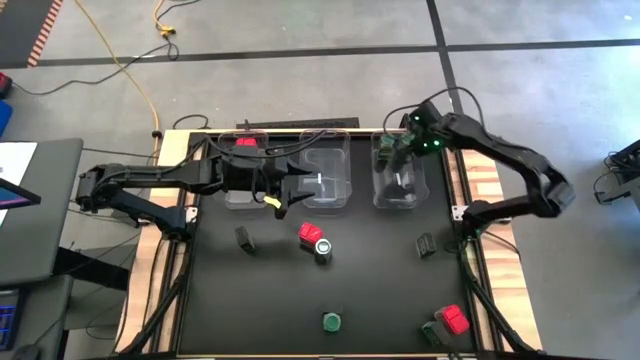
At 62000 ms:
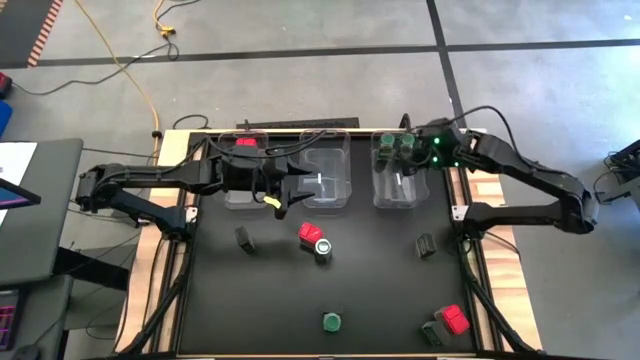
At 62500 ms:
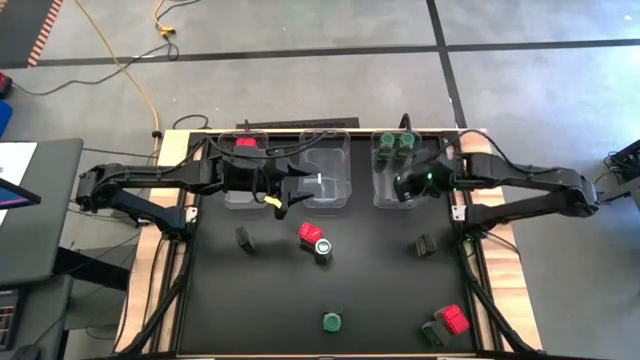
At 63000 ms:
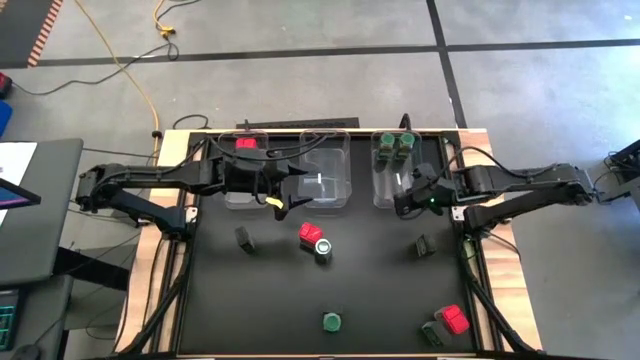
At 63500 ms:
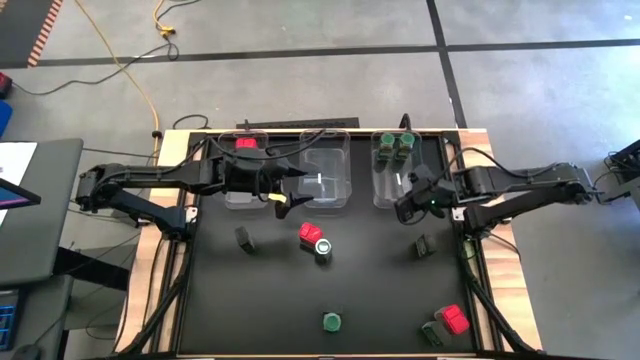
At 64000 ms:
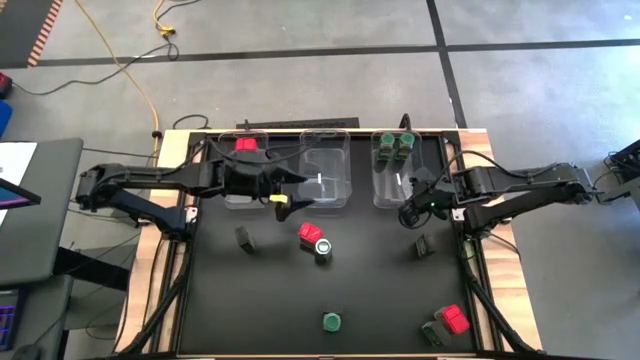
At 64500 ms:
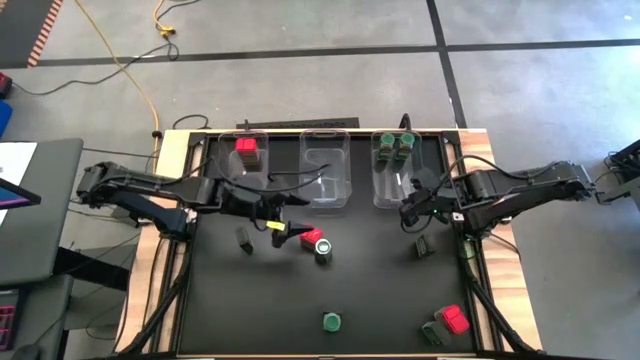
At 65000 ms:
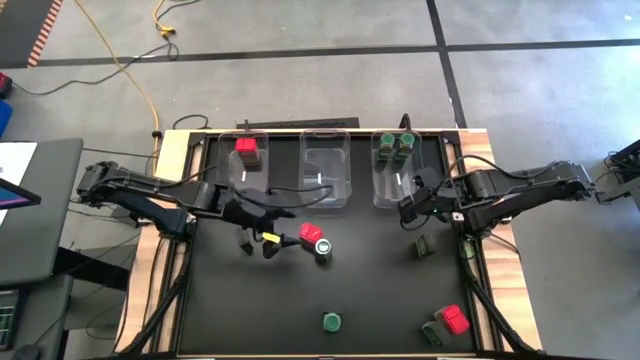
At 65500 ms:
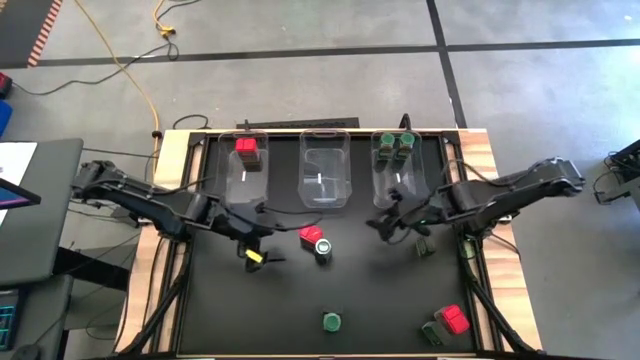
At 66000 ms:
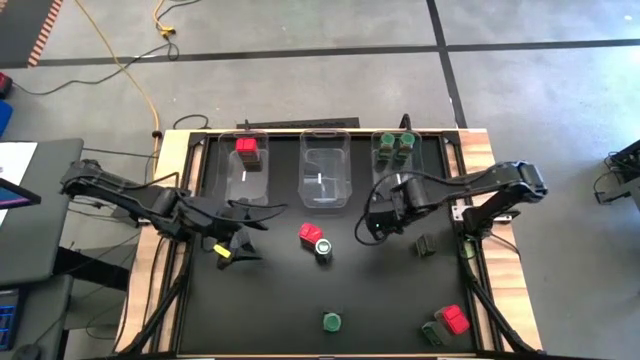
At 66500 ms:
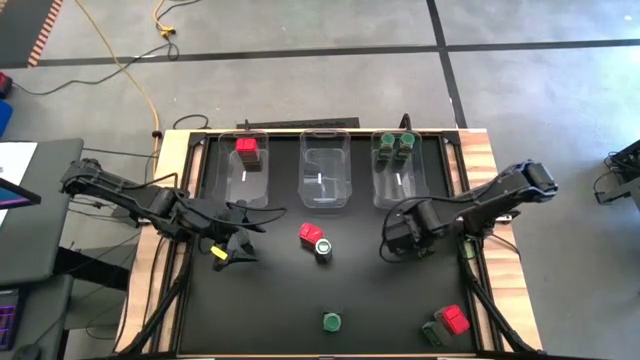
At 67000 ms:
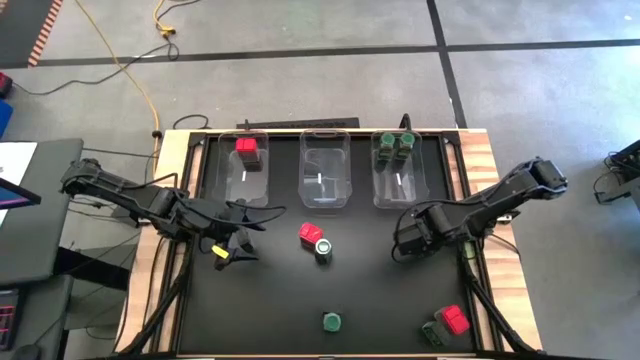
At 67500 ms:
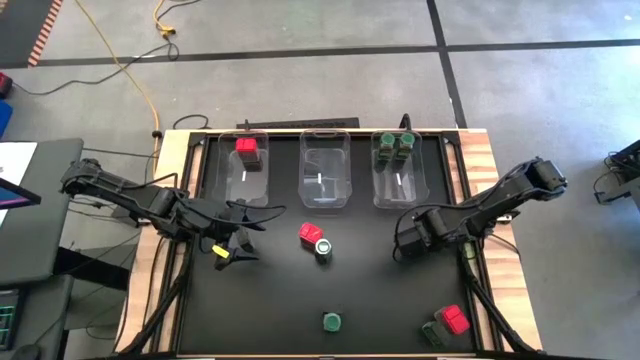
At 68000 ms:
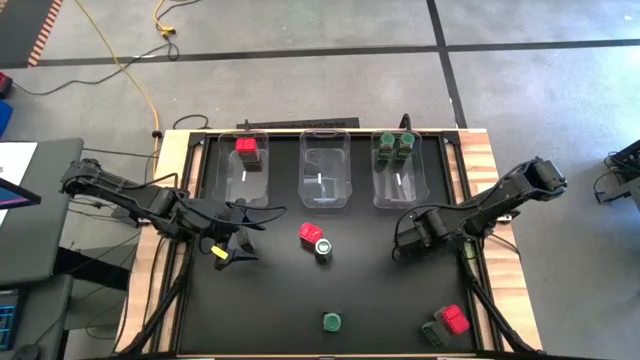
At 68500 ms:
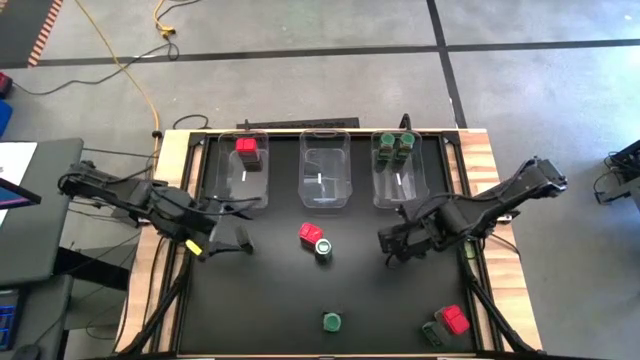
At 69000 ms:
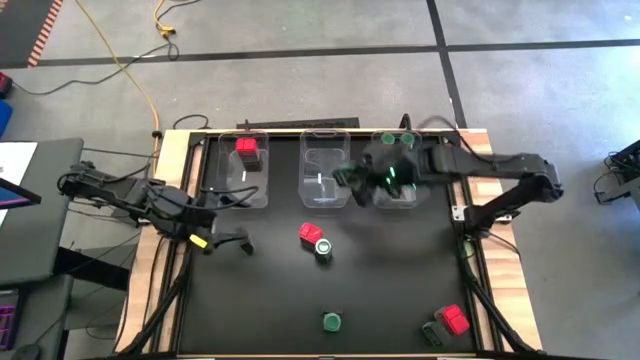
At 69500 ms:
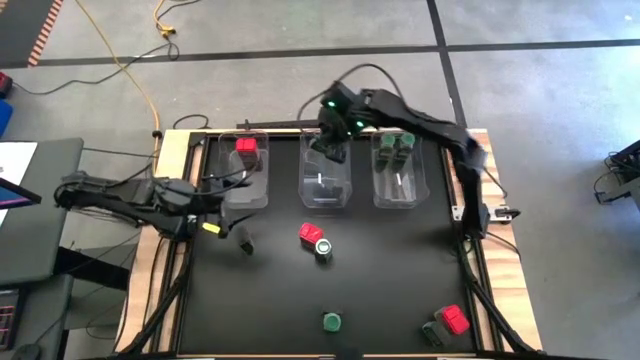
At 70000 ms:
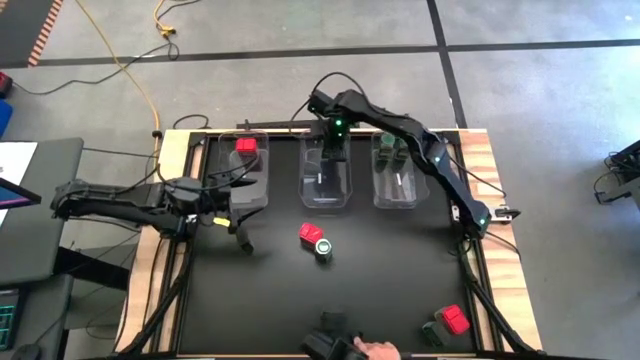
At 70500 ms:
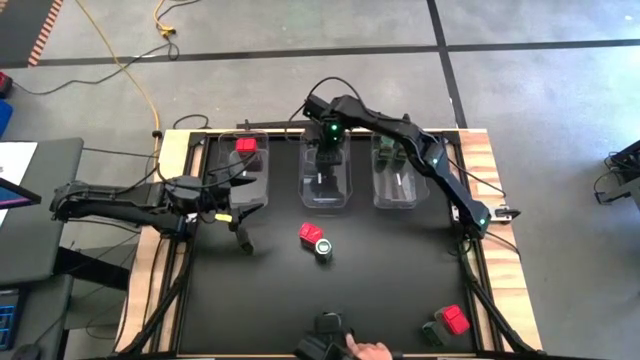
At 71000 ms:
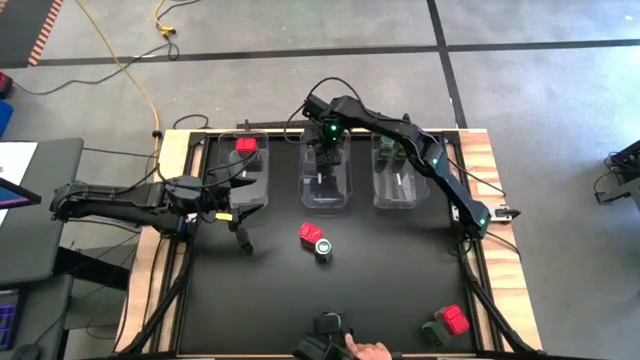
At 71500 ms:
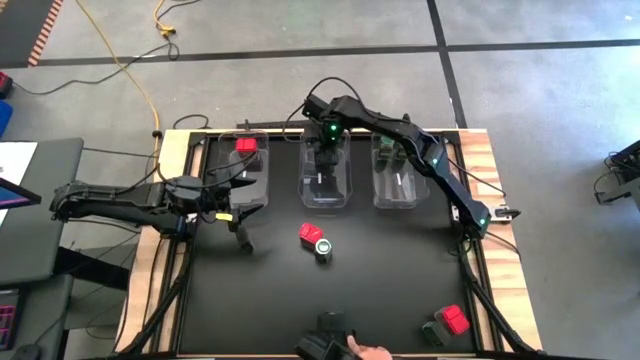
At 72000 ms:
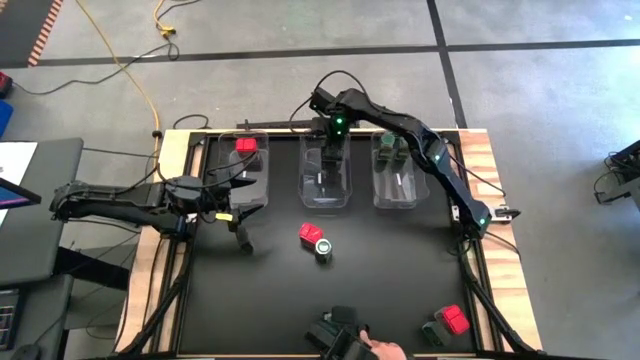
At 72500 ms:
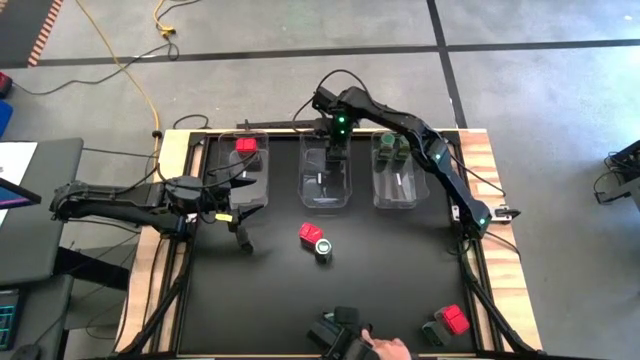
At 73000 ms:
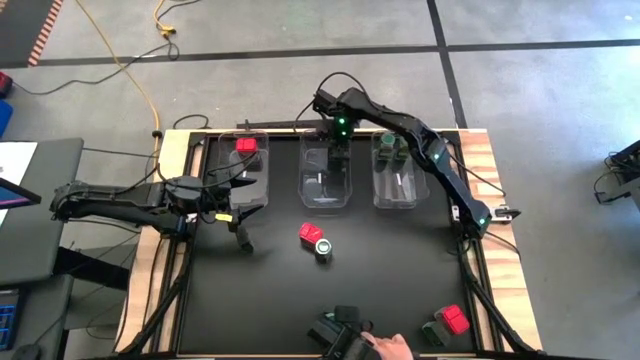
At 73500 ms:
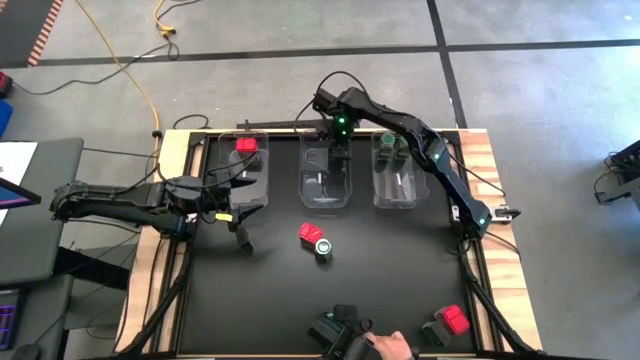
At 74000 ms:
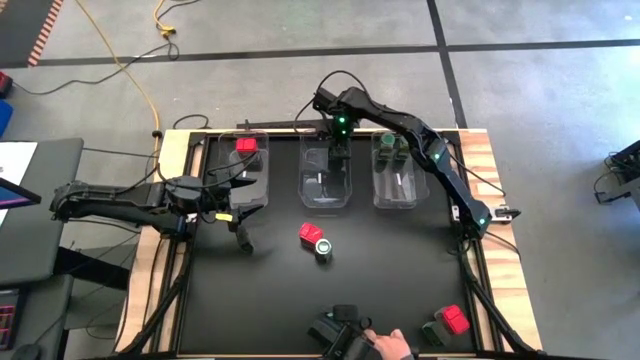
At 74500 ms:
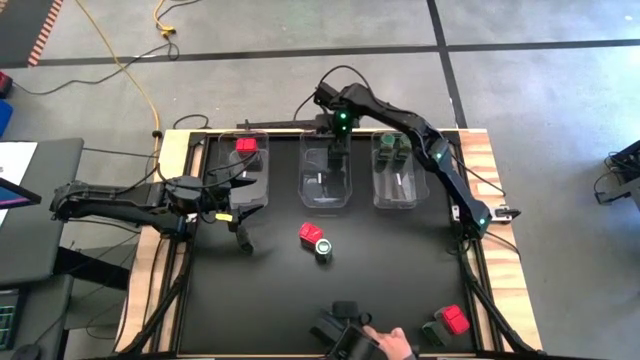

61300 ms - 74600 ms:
Task: Sort spices by type
Put the black seasoning can into the middle transparent bin

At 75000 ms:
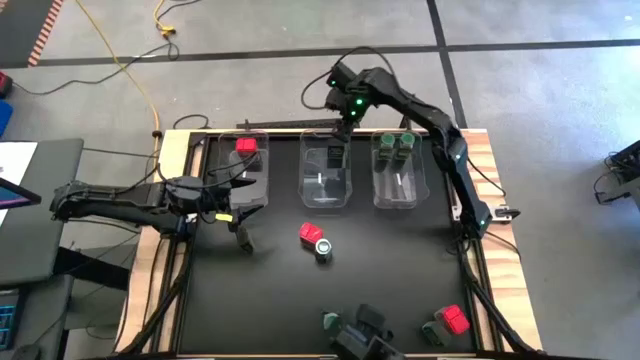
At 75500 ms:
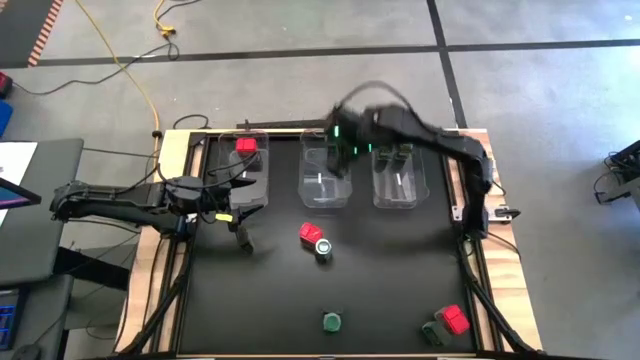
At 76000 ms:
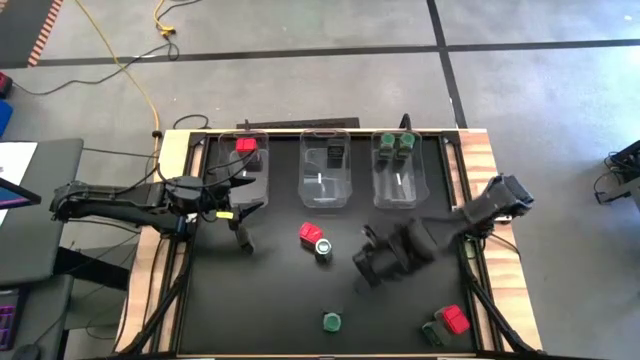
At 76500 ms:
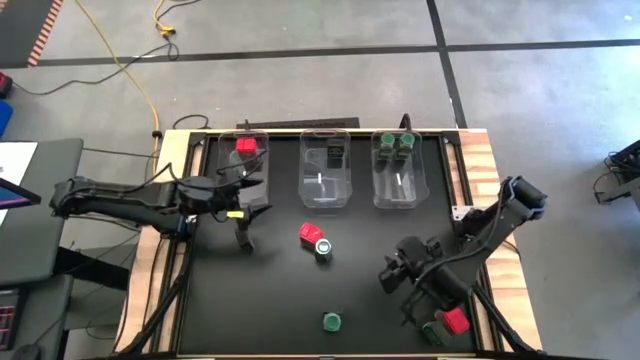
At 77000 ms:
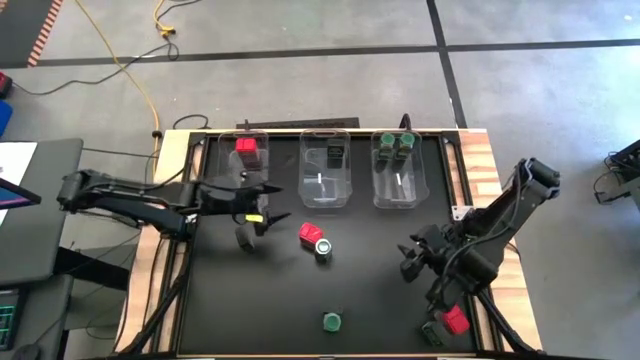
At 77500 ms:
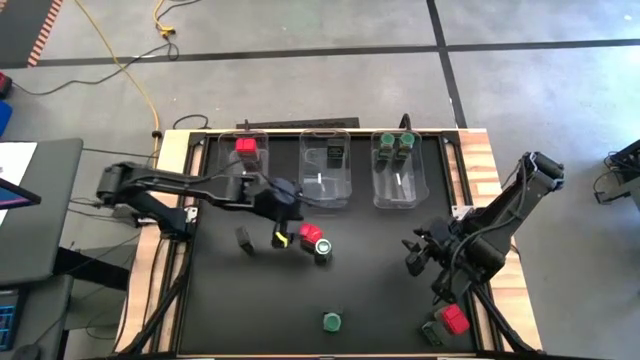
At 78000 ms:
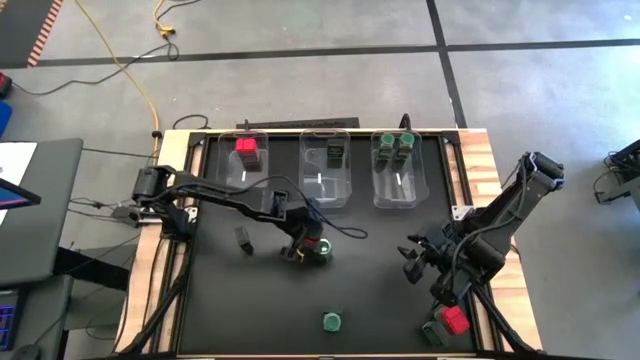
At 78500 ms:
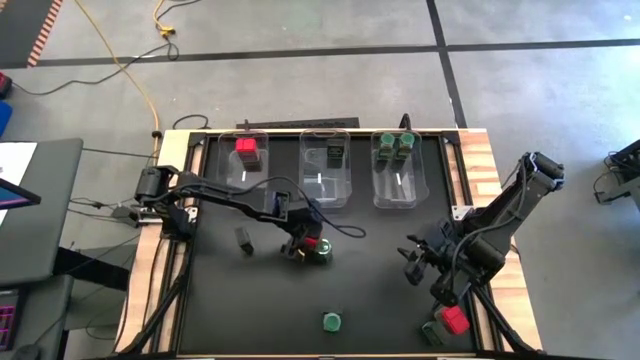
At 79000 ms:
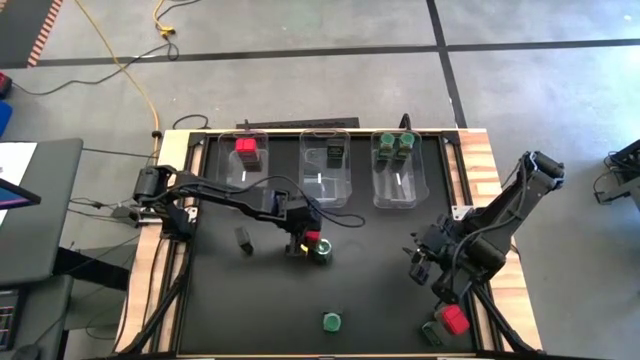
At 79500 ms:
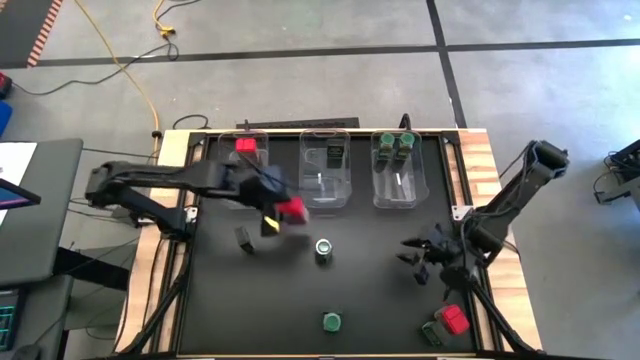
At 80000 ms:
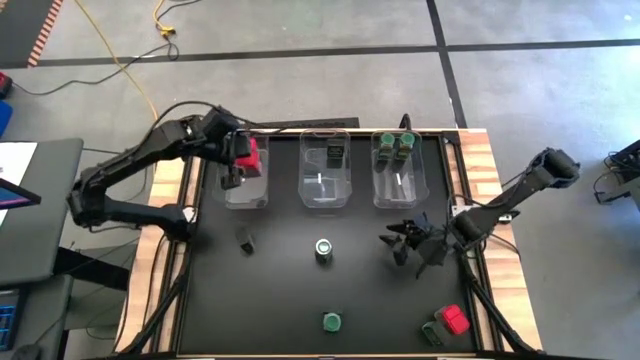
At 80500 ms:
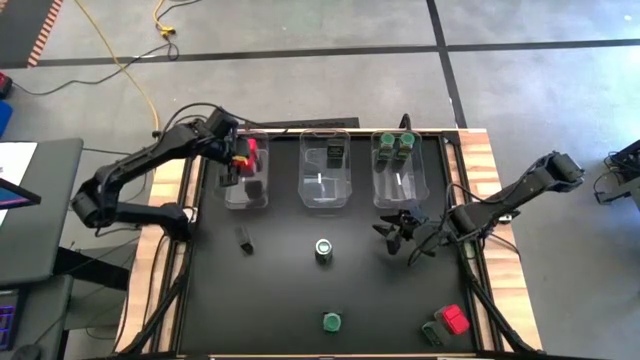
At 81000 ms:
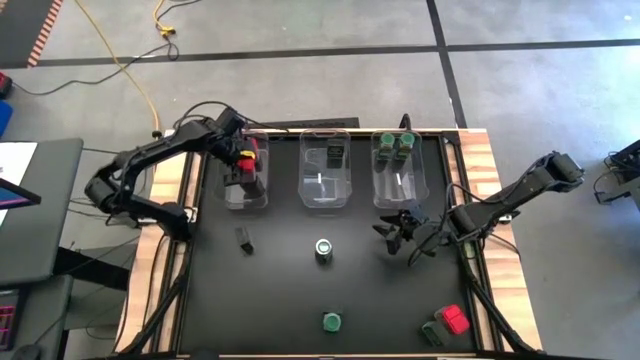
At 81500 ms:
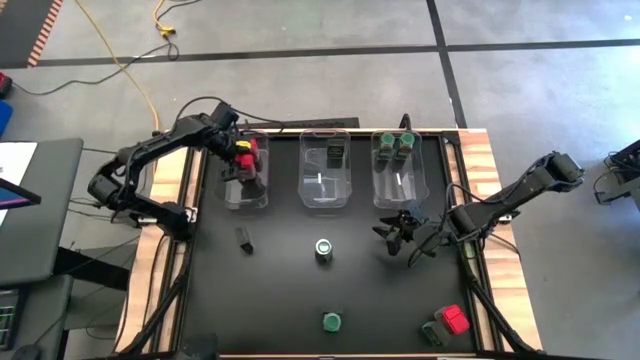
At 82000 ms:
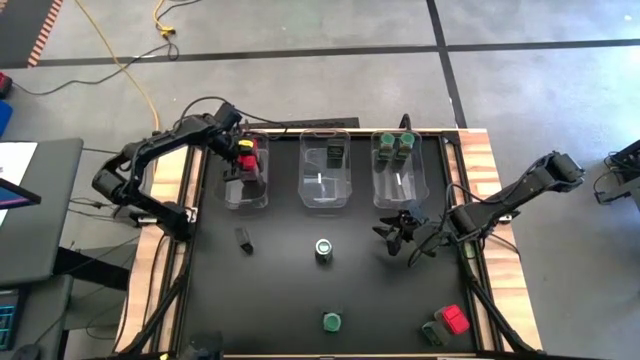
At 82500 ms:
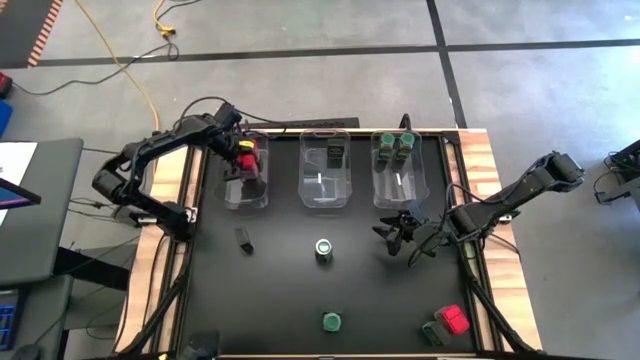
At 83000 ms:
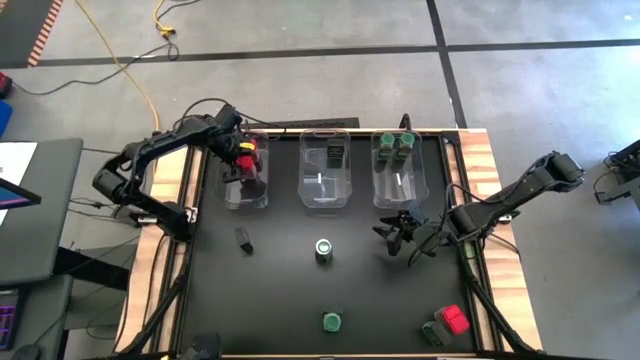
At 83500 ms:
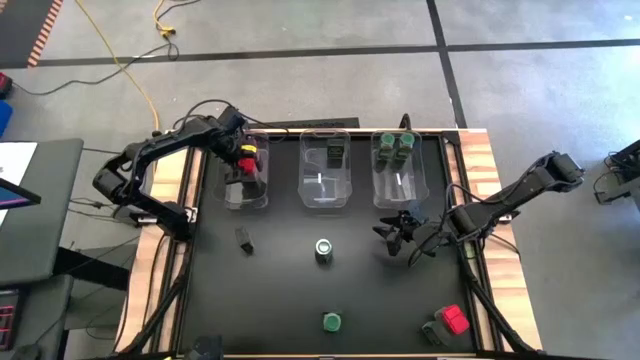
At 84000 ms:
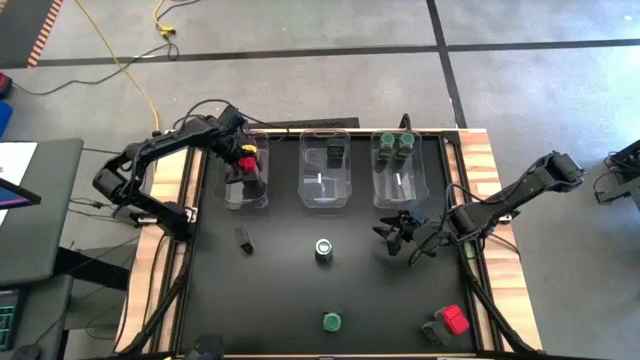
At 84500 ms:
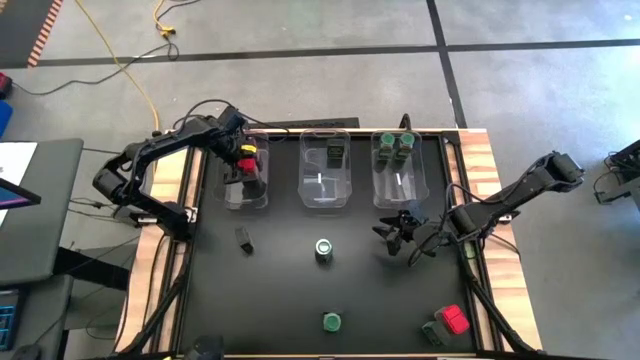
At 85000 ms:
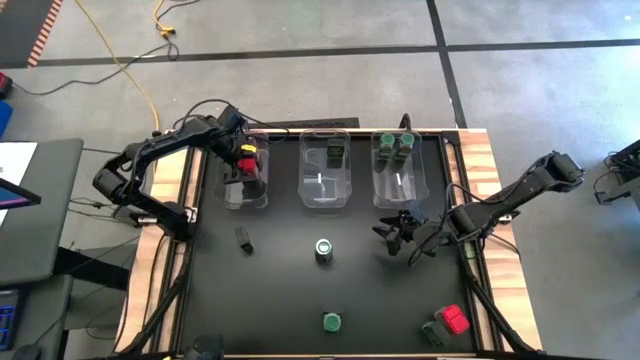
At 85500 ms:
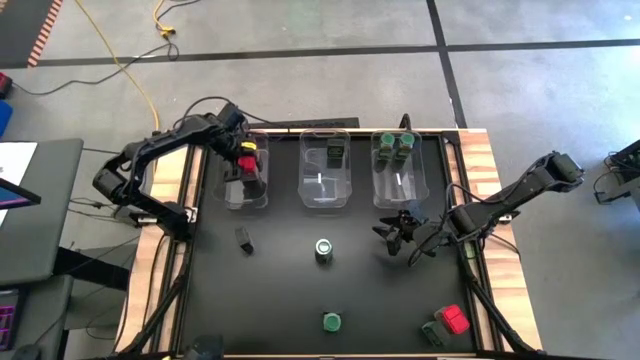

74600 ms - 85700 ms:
Put the red seasoning can into the left transparent bin
